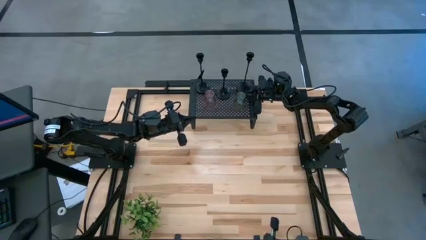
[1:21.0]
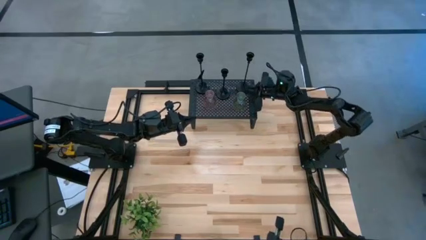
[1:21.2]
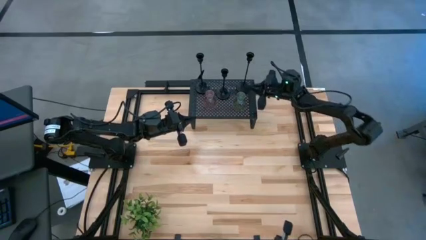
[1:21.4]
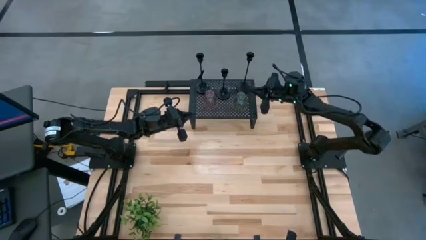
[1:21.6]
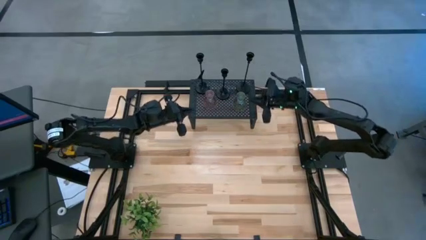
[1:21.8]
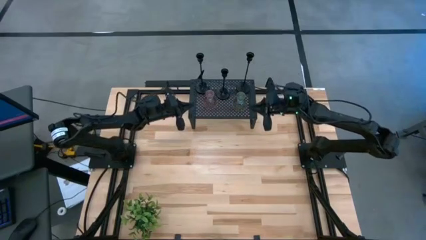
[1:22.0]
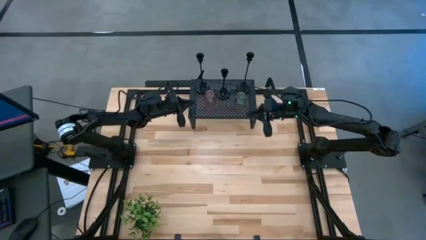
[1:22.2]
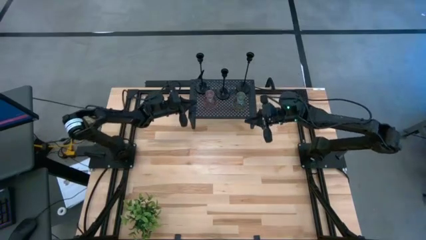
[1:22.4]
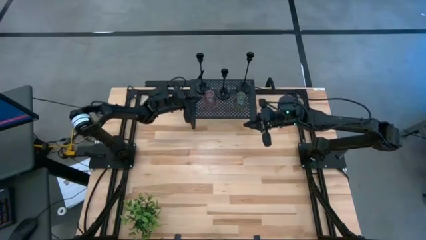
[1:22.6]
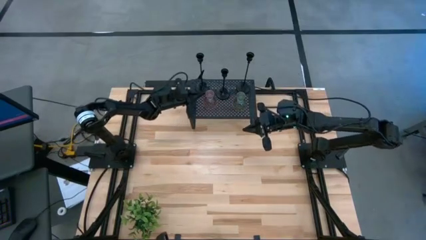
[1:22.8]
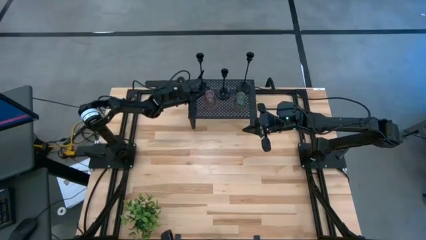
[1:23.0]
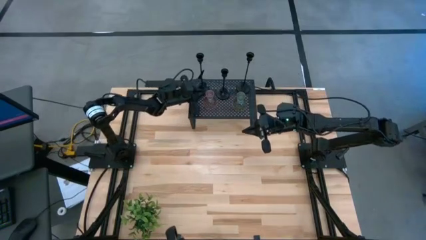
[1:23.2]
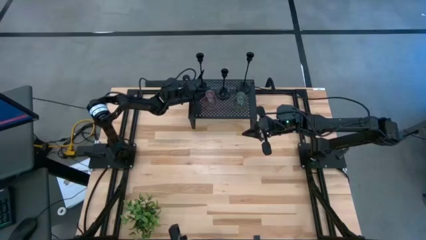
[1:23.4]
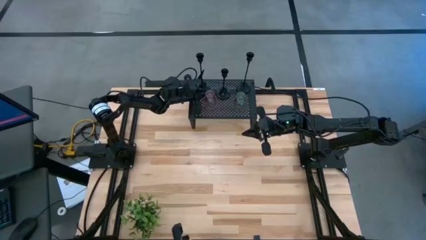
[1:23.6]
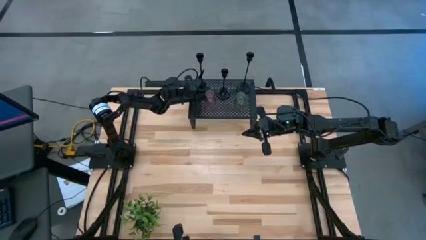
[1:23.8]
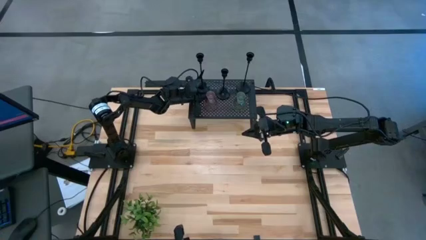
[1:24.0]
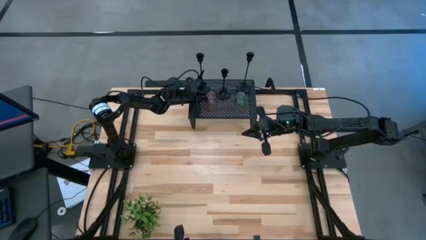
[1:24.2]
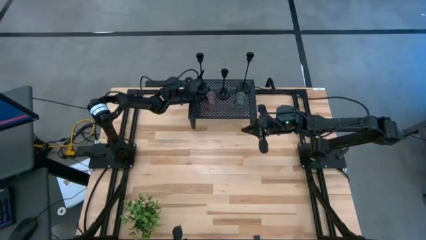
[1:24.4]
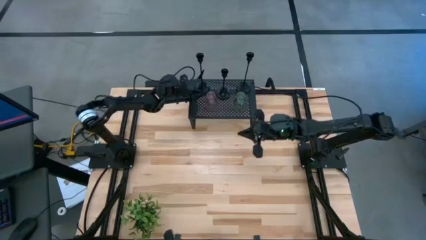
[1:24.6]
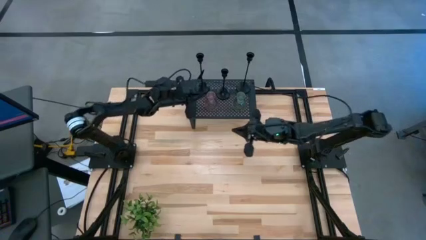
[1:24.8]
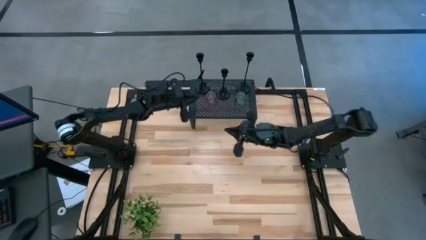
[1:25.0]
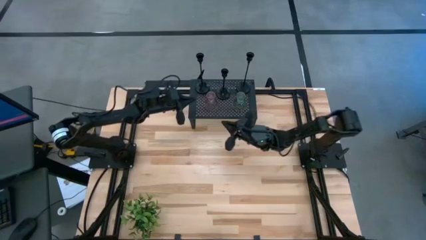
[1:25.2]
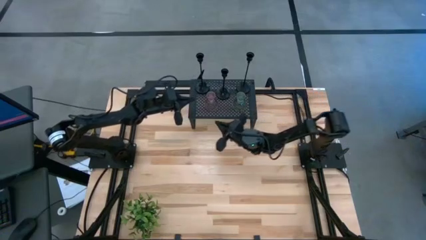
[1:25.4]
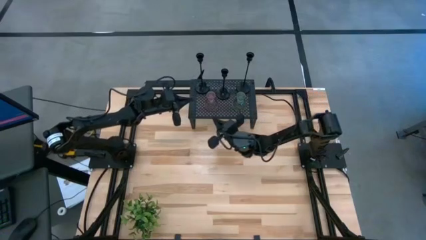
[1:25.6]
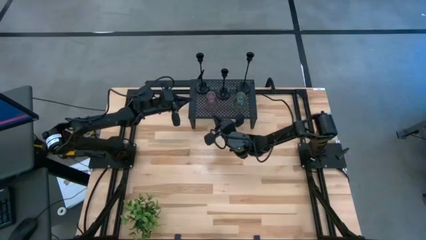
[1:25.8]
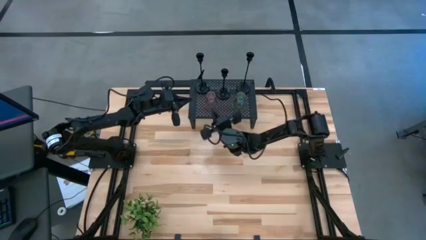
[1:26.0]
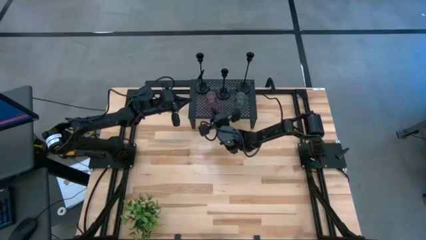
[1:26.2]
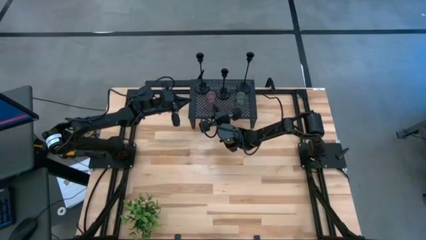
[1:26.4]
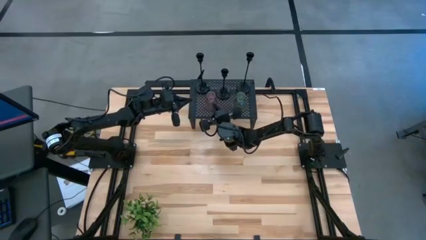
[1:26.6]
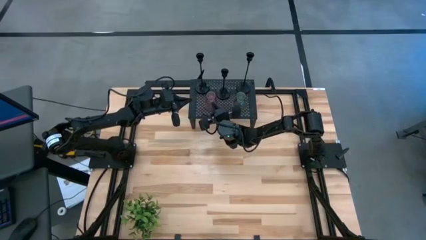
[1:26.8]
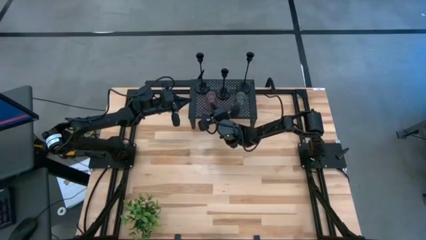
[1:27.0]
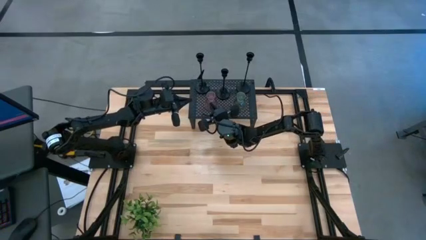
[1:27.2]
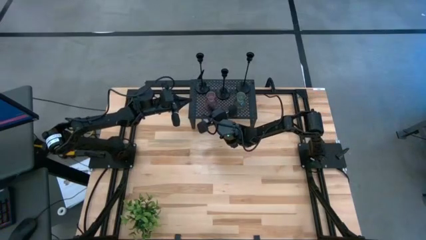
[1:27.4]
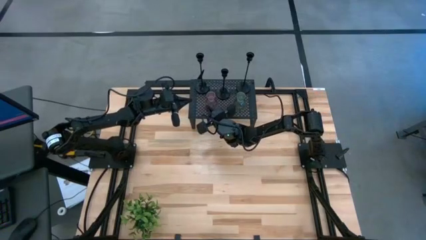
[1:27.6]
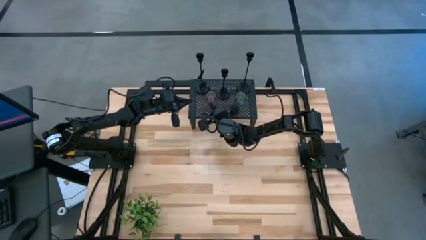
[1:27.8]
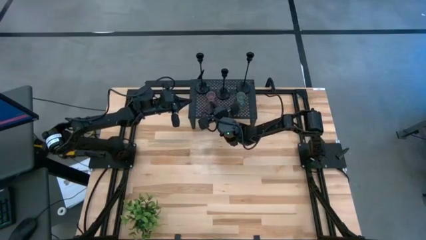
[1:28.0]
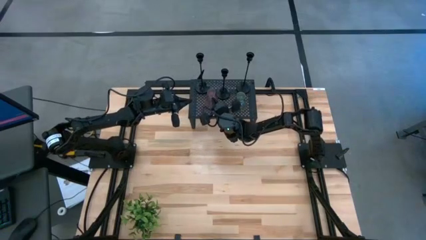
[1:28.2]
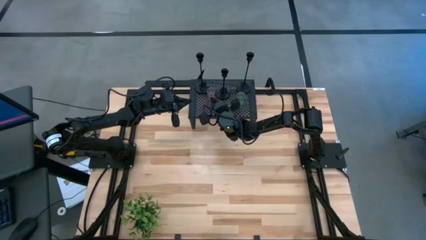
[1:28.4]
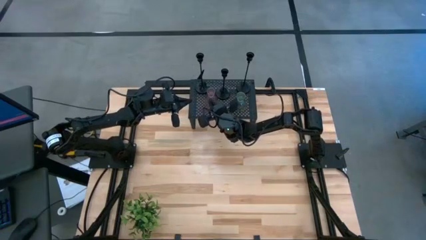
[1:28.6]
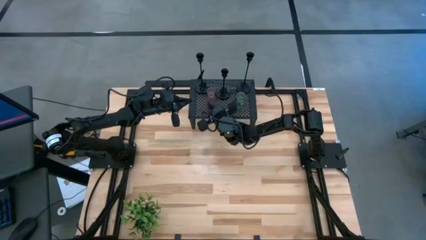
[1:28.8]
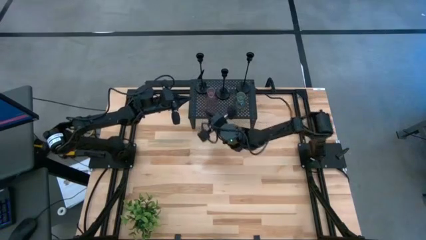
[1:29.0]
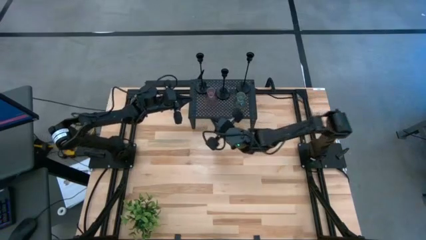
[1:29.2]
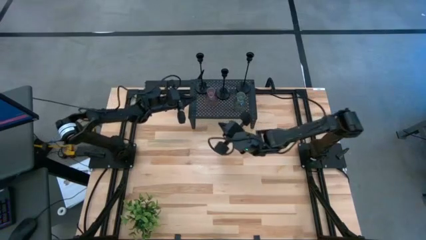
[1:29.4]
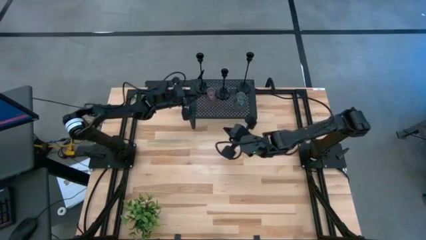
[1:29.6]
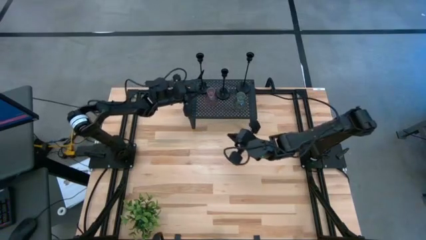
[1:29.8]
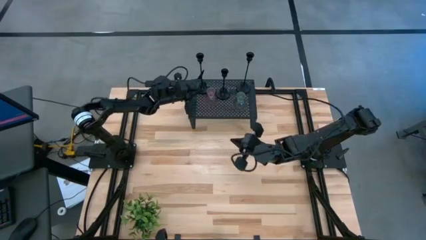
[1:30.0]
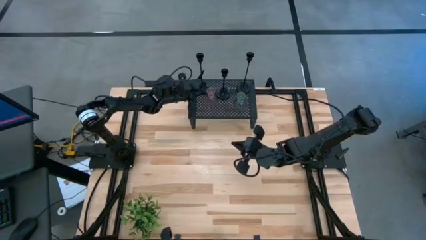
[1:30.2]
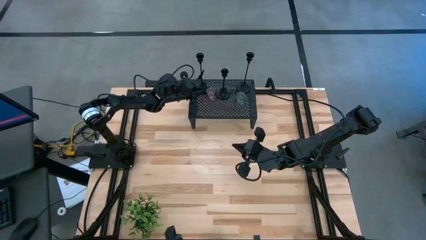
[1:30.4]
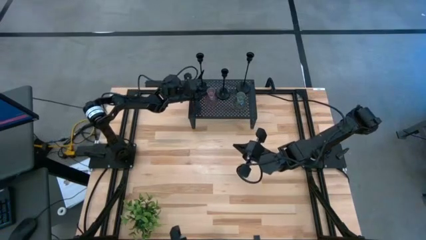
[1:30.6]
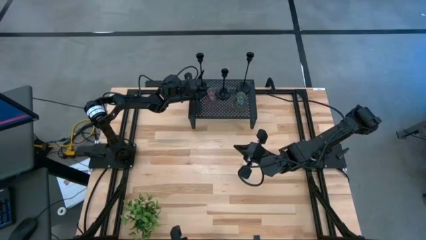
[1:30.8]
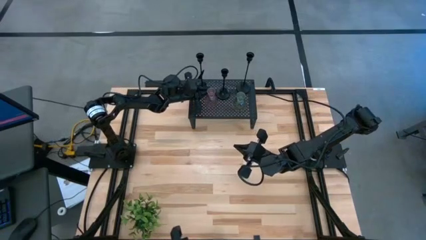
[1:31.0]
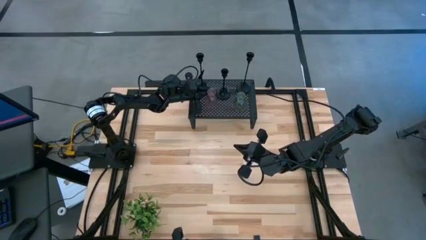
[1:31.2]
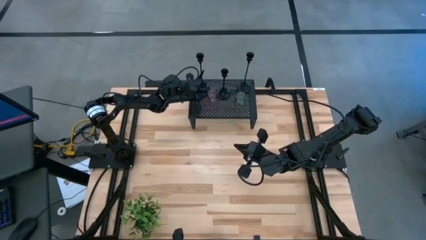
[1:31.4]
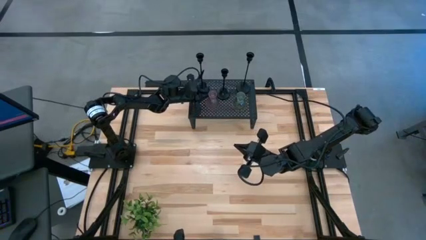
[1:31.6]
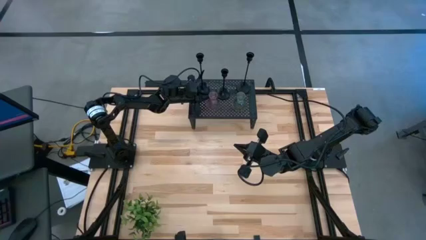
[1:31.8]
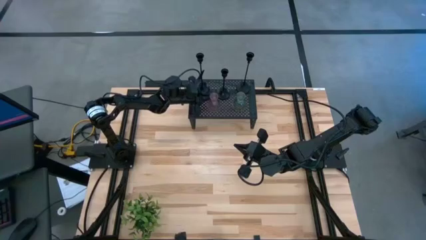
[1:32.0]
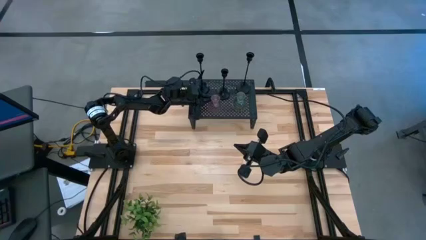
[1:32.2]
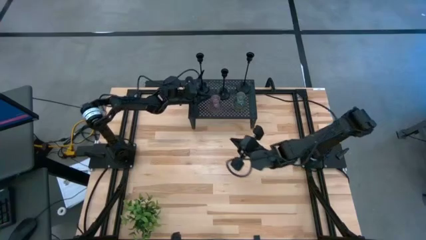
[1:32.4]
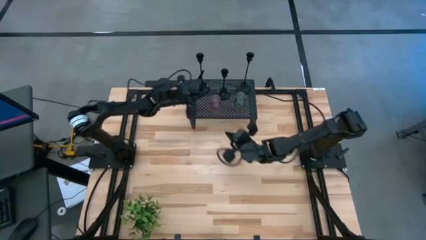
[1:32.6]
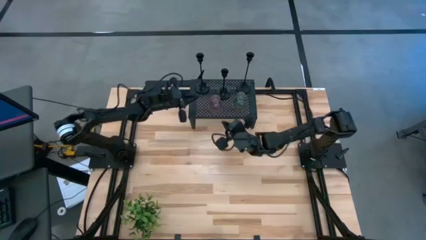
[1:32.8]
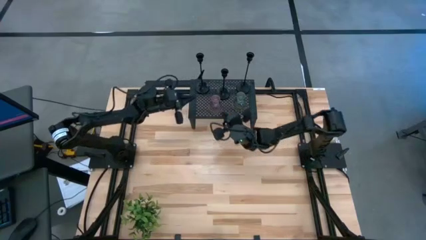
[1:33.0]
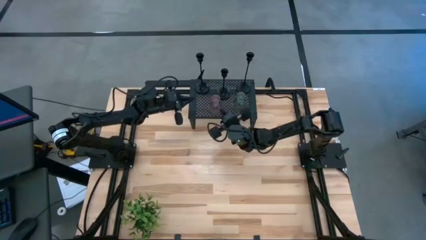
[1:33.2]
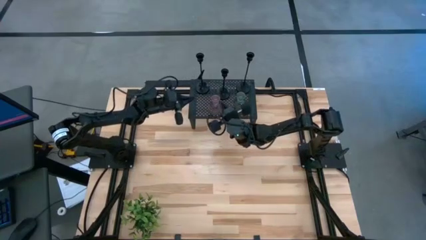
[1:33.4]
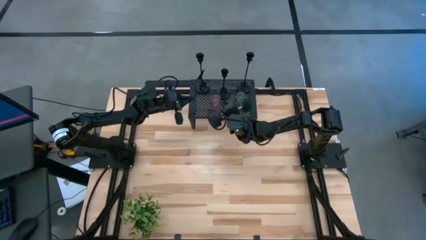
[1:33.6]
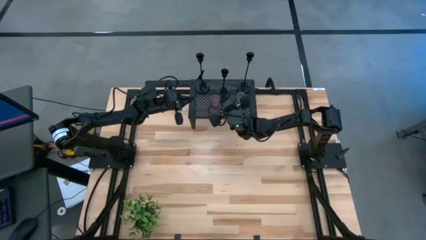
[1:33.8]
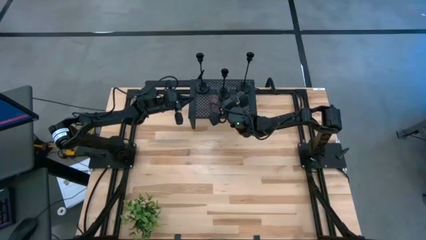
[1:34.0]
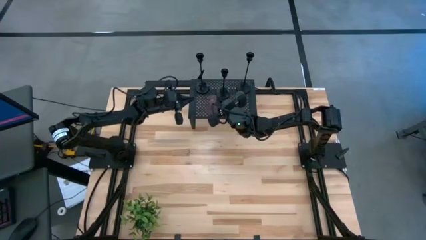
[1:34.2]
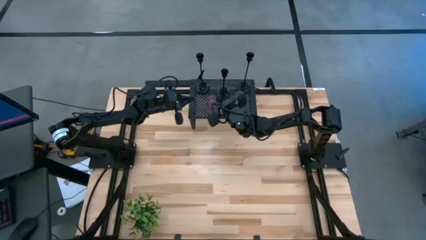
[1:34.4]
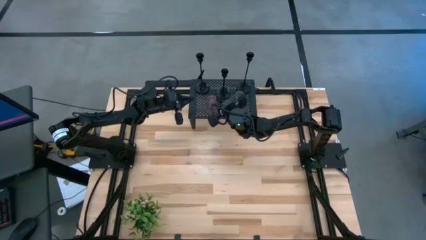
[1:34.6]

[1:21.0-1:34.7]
Task: Pick & Place candle stick holders
Adjust the purple candle holder on the shelf

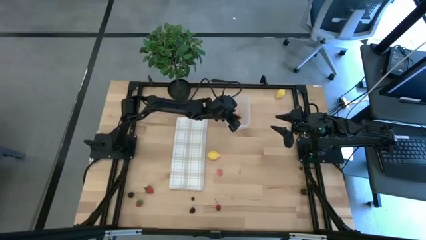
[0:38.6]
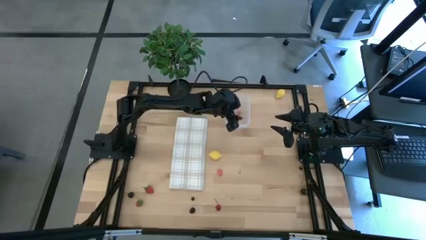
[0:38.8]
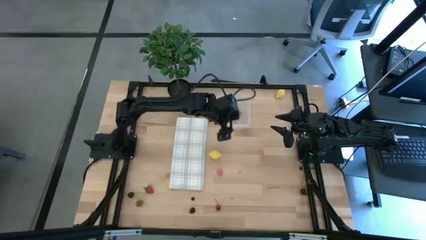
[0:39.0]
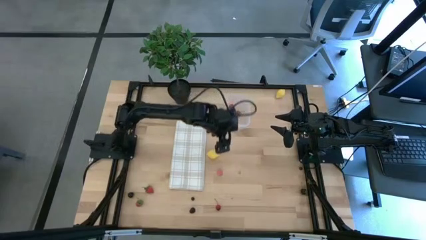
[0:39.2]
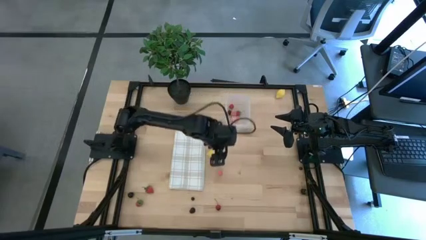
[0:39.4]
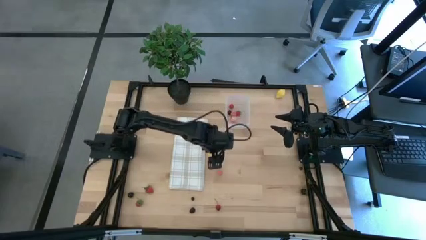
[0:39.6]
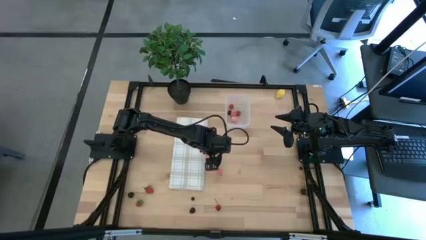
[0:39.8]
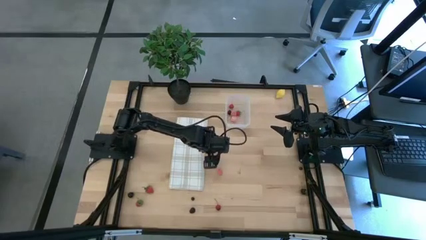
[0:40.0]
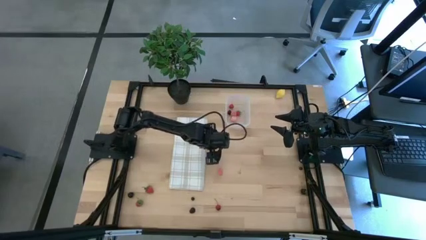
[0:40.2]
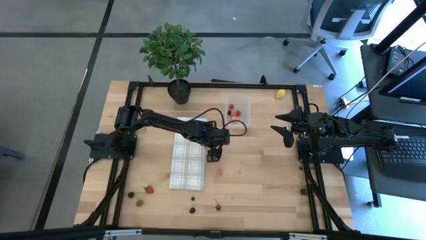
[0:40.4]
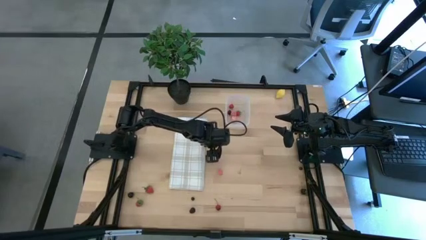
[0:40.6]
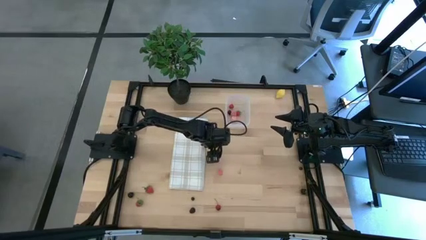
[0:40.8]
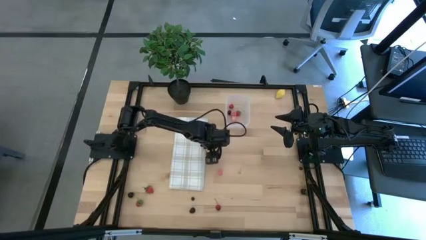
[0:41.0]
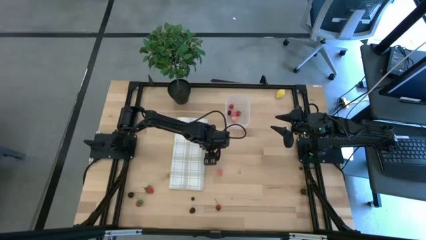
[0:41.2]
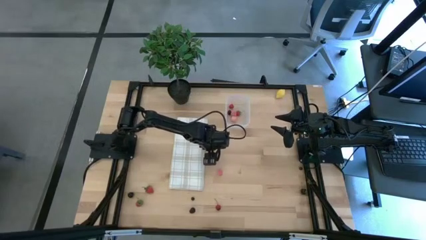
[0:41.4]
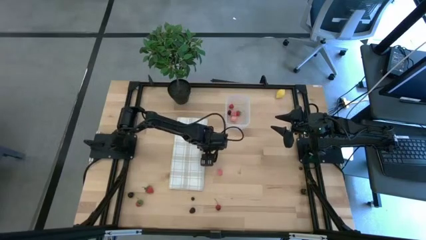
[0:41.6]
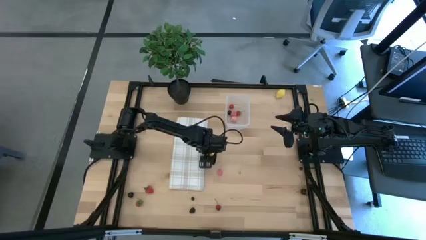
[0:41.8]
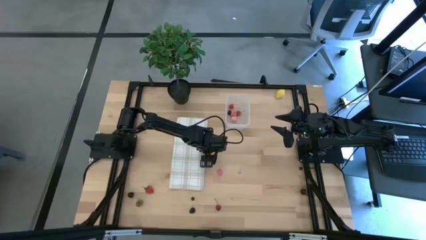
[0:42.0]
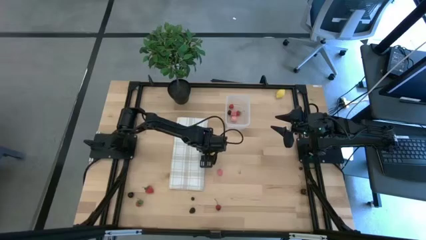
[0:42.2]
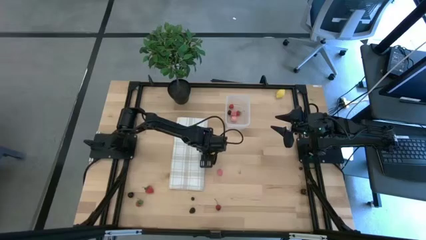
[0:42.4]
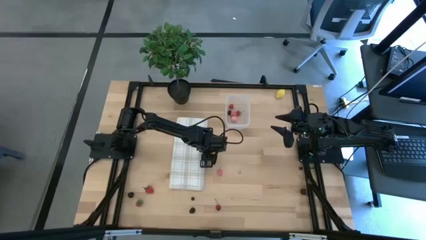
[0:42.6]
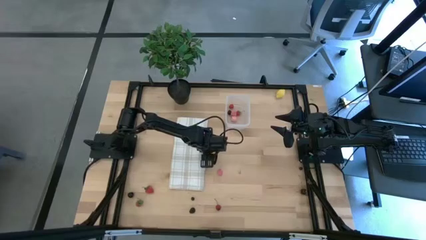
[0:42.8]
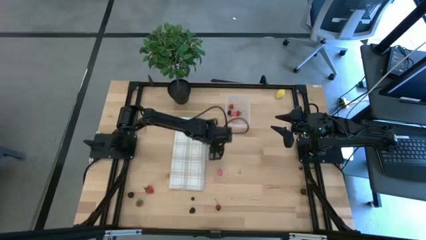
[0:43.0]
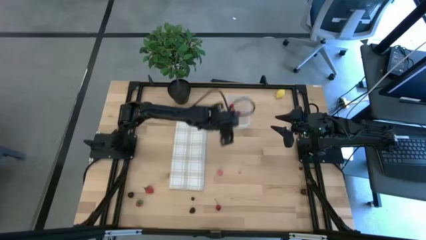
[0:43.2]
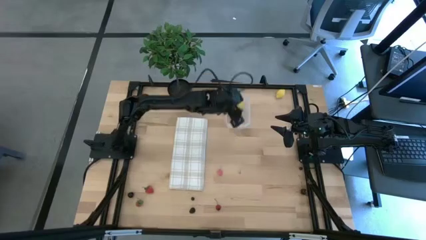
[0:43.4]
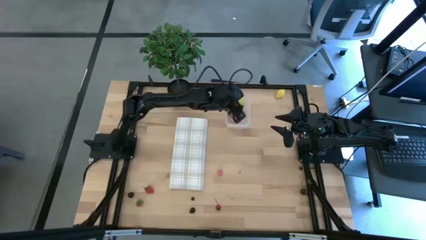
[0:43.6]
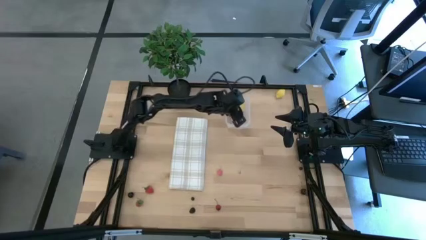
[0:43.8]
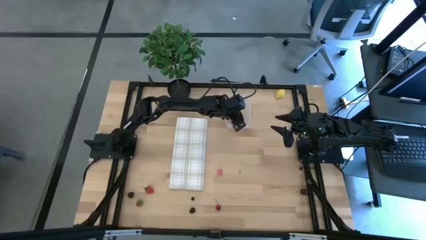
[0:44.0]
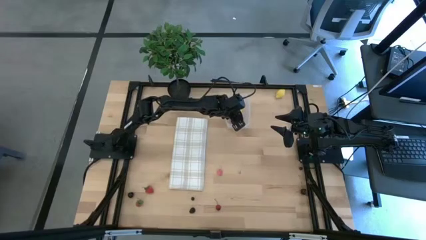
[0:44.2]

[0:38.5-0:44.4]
Task: Pick and placing Produce into tupperware
Put the bottom lemon into the transparent bin
